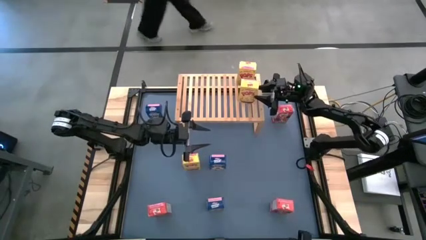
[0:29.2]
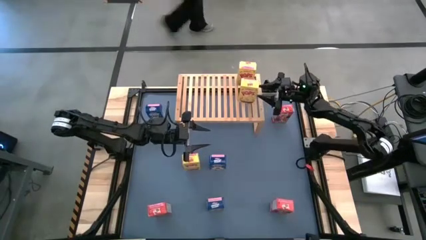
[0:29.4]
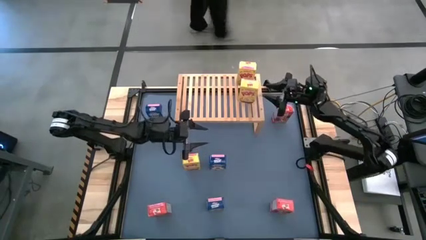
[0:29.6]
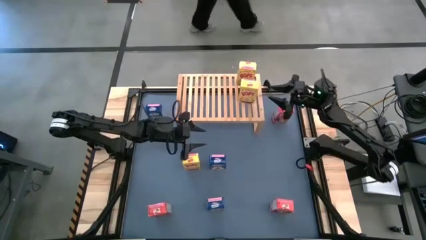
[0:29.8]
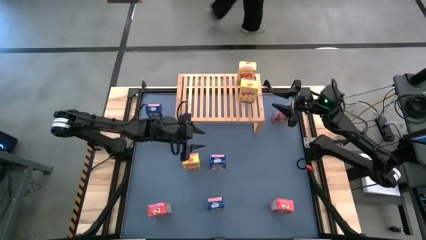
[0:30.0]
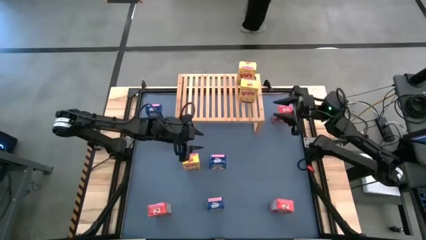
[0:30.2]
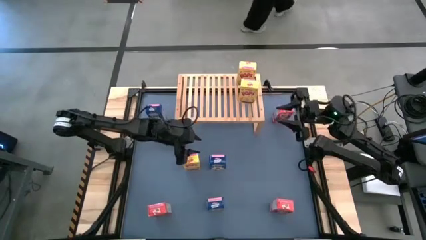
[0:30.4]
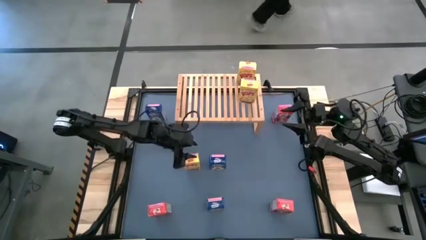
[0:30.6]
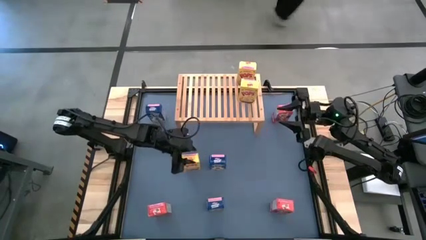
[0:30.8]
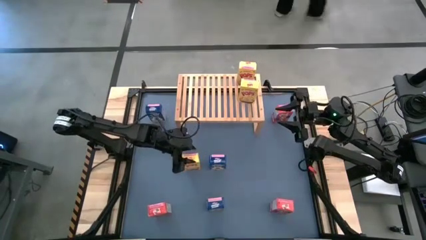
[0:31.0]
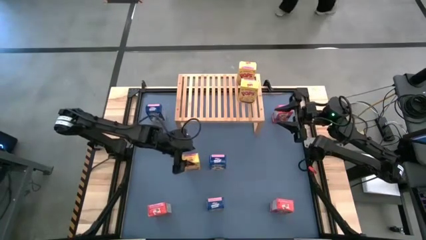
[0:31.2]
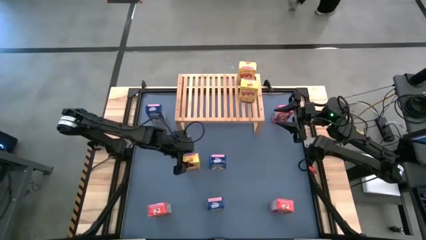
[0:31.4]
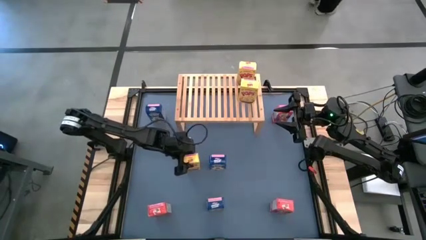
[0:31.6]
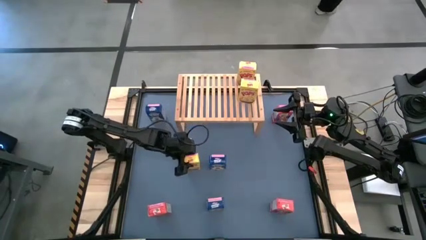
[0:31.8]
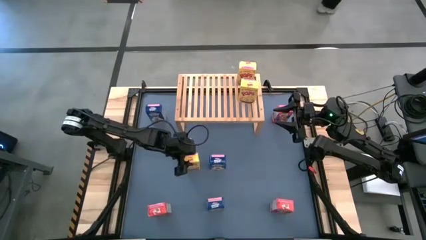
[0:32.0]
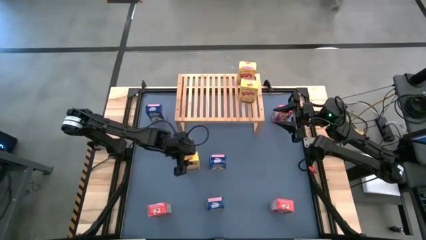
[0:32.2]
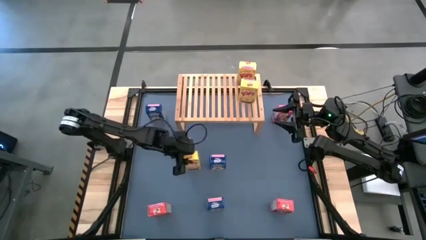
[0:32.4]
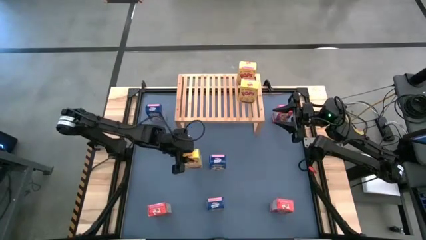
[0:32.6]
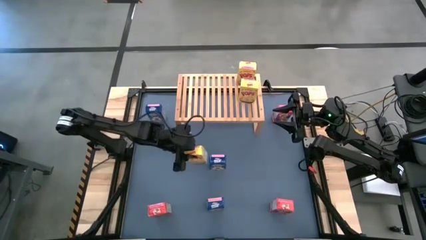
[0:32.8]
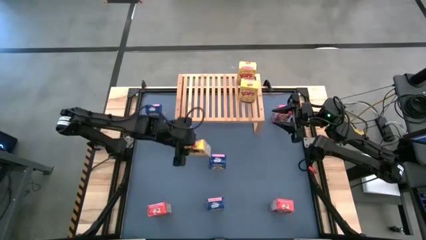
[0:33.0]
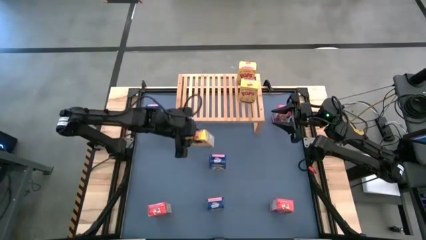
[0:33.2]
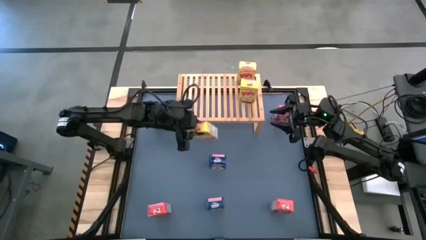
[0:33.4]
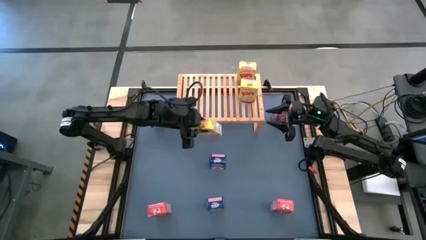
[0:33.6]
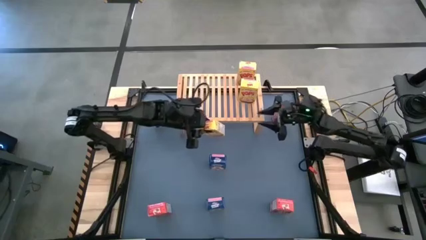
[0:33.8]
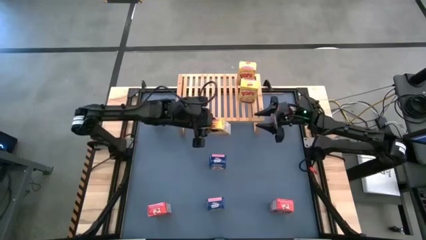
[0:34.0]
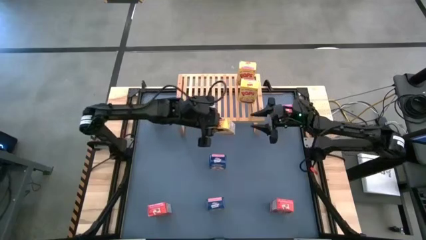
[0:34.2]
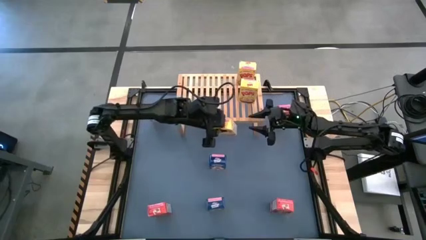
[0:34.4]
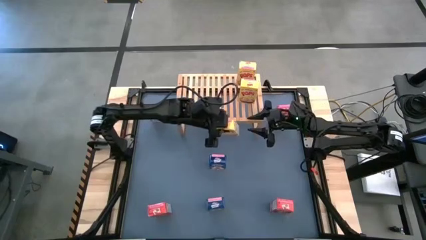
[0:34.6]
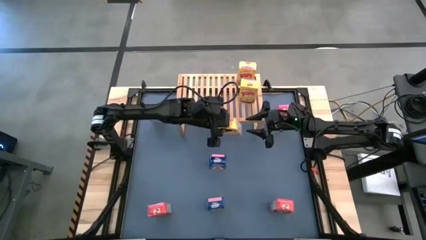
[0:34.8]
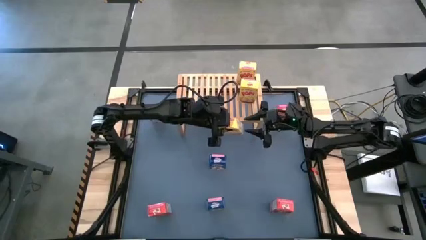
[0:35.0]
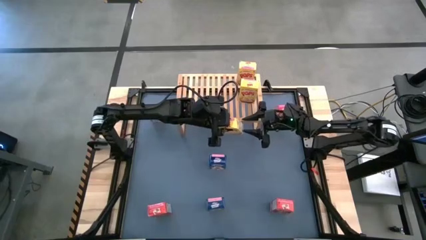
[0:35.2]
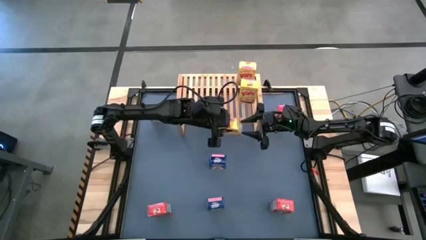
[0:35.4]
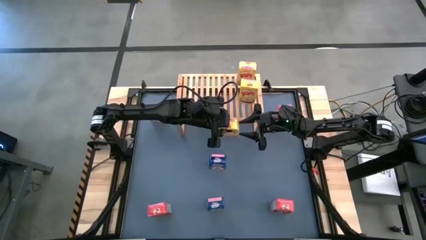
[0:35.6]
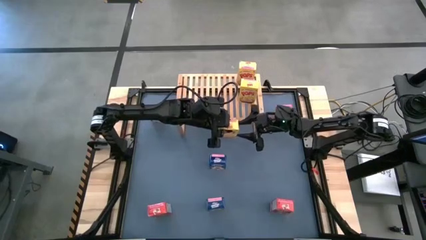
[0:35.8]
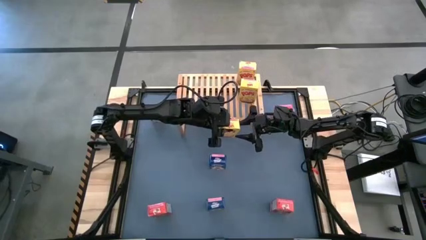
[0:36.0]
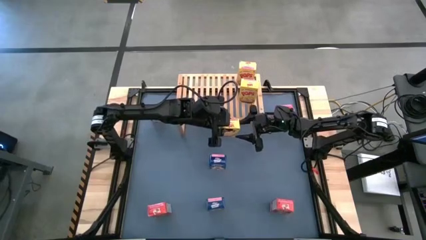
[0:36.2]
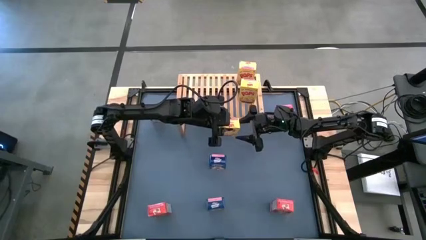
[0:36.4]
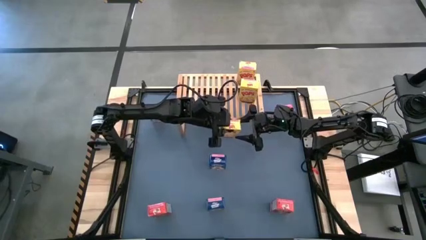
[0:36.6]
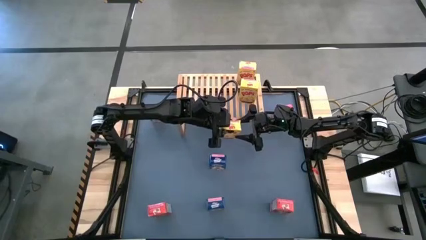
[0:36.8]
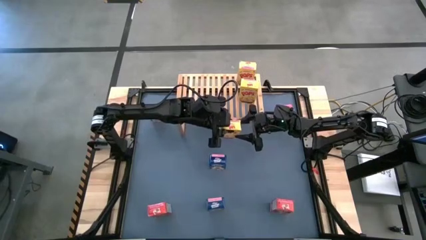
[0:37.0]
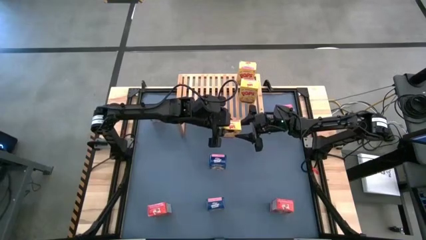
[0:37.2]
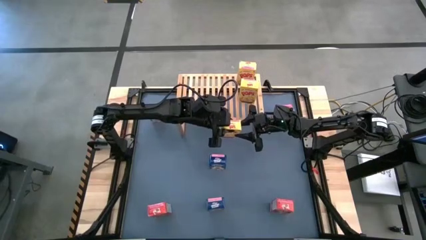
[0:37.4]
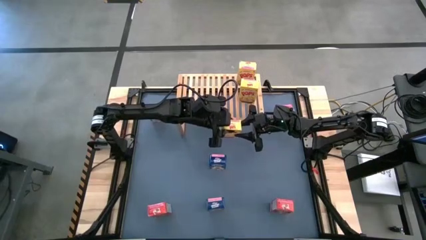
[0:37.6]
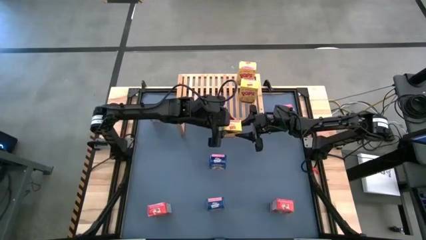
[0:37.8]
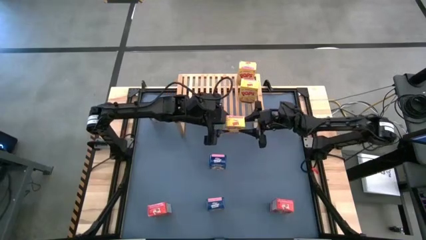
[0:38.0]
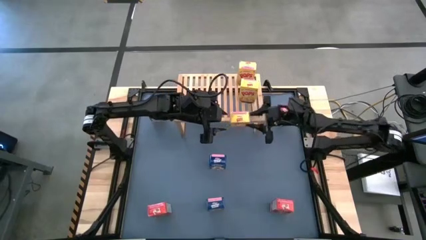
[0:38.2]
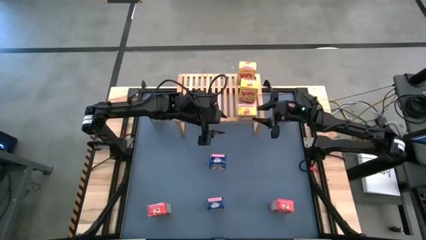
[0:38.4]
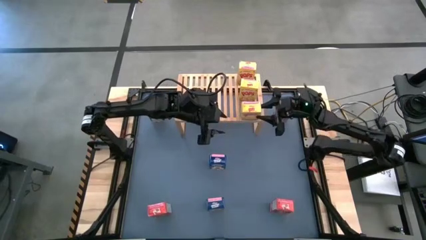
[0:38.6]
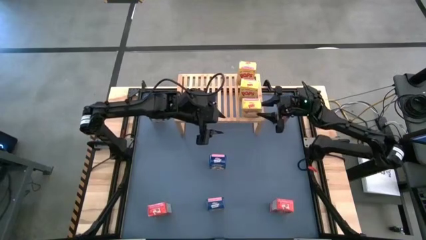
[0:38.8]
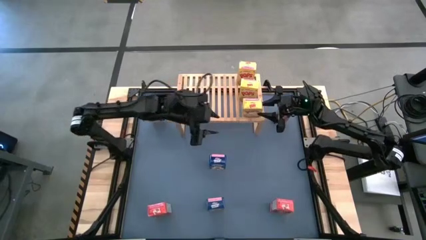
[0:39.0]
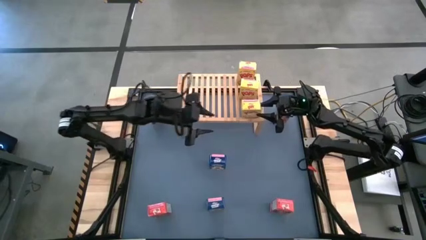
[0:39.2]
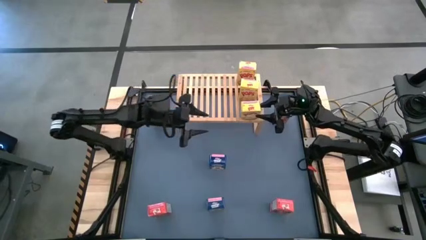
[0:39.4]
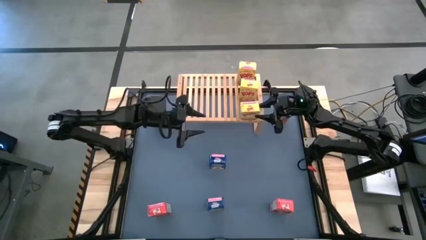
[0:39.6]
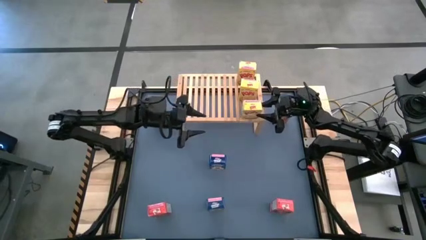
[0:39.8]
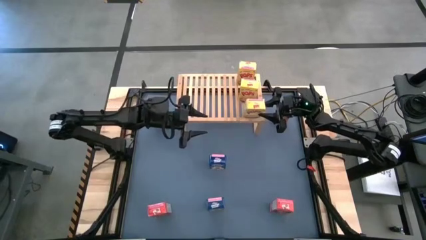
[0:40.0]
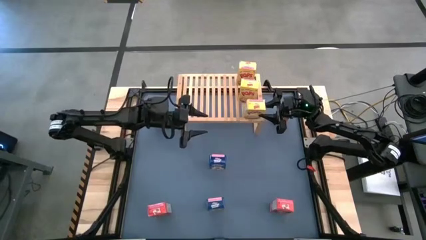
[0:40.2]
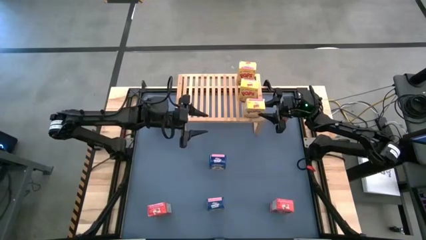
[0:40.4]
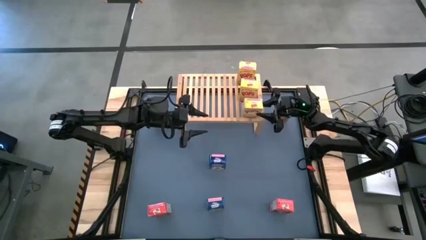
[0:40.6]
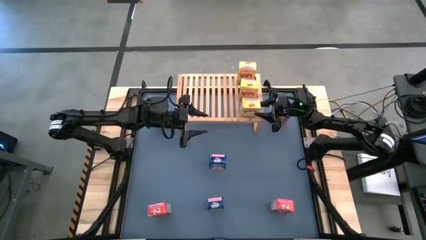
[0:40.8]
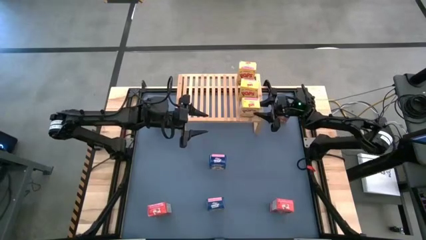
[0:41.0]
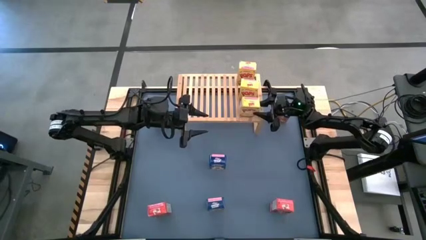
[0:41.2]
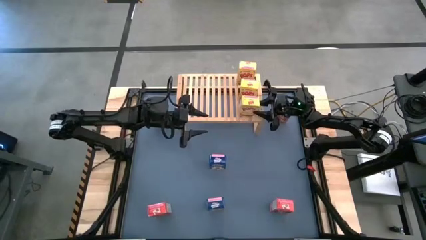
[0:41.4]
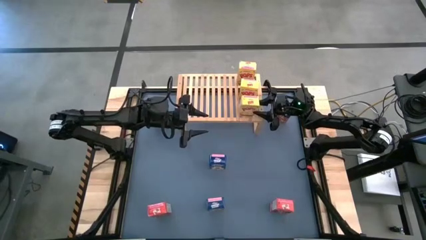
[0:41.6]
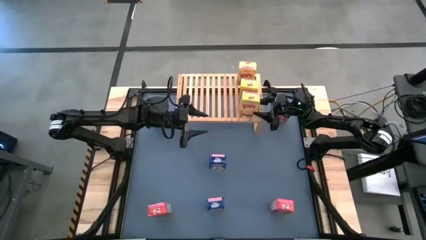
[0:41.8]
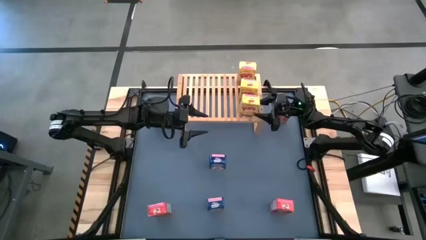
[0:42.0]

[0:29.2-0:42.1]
Task: Stack cereal on shelf
Put the yellow cereal box on the shelf aligned with the other yellow cereal boxes

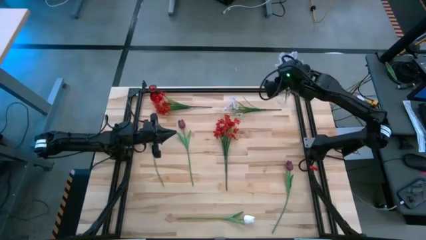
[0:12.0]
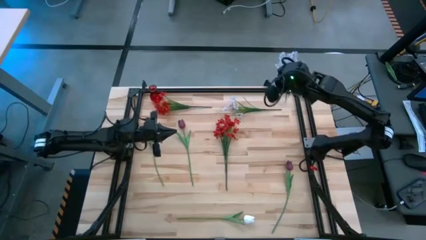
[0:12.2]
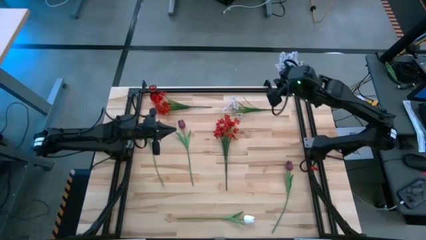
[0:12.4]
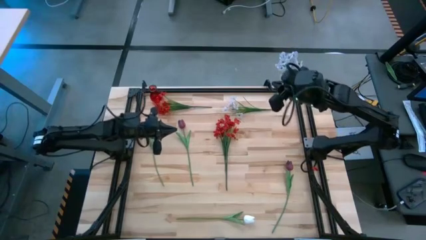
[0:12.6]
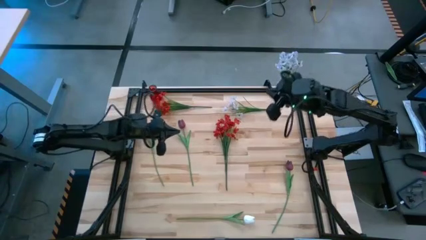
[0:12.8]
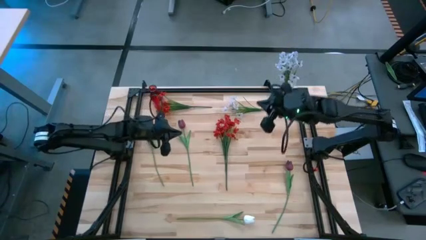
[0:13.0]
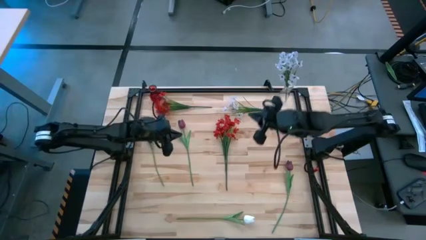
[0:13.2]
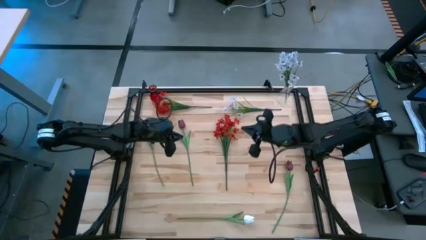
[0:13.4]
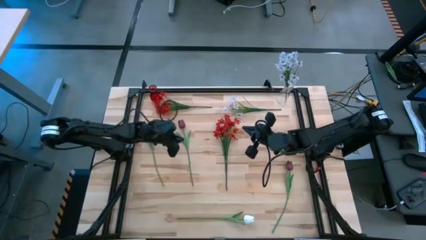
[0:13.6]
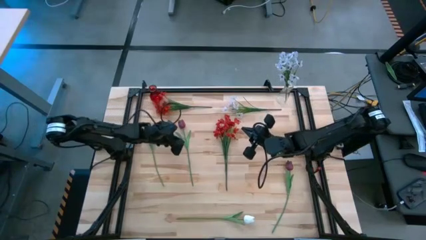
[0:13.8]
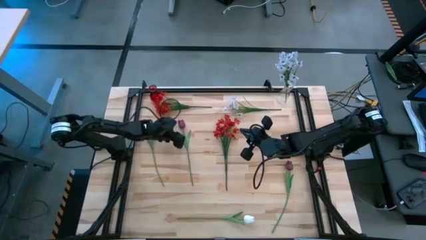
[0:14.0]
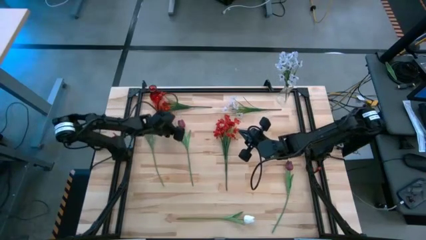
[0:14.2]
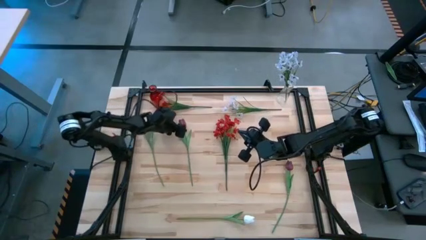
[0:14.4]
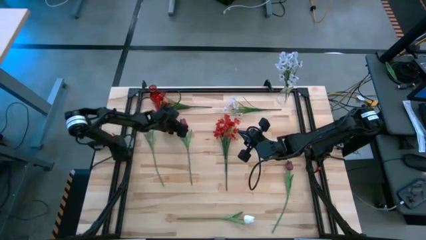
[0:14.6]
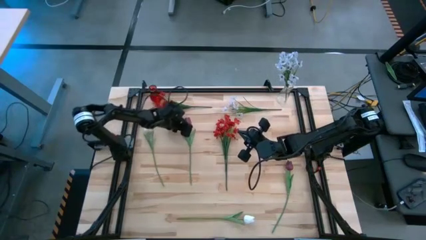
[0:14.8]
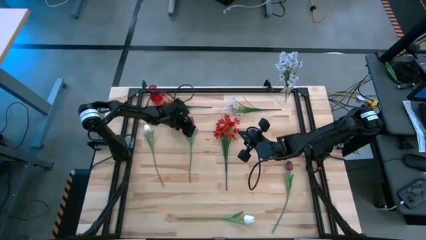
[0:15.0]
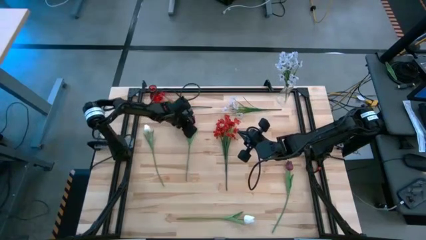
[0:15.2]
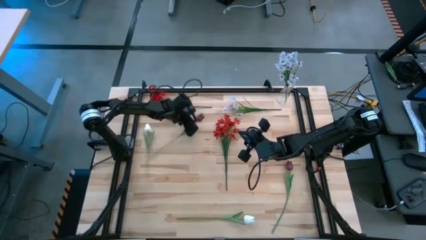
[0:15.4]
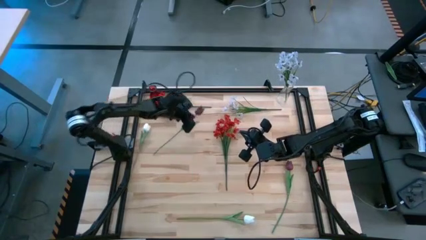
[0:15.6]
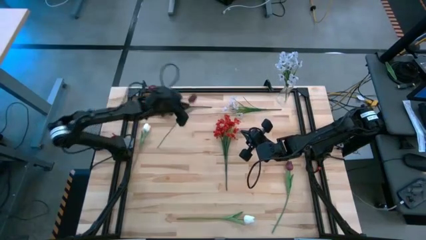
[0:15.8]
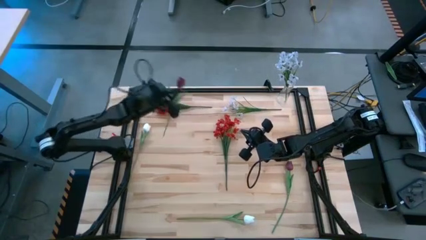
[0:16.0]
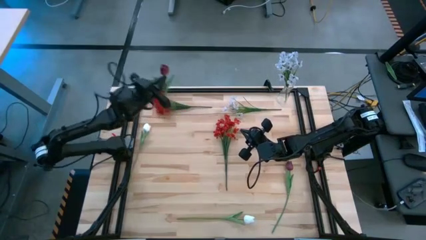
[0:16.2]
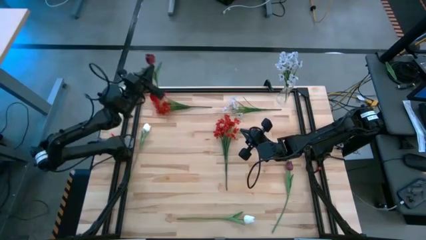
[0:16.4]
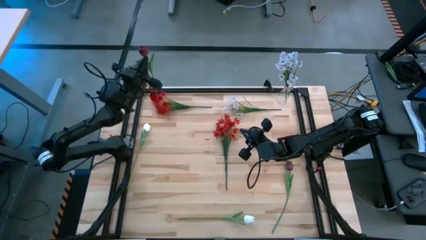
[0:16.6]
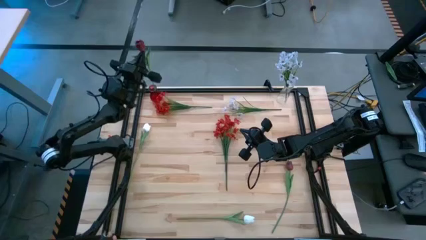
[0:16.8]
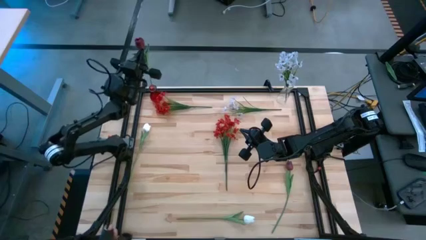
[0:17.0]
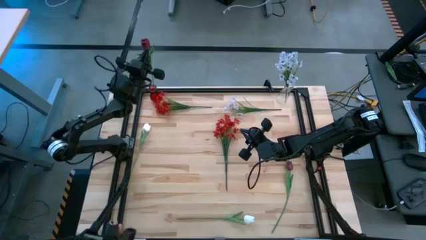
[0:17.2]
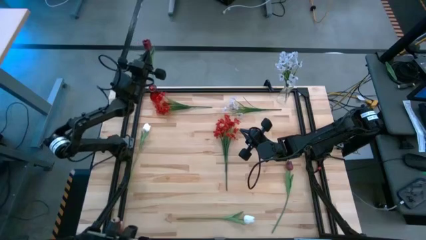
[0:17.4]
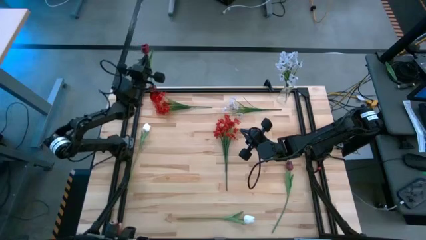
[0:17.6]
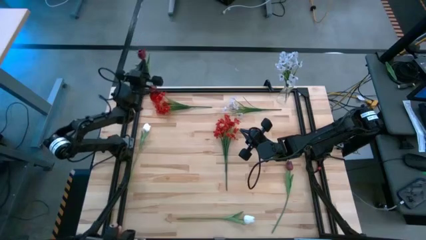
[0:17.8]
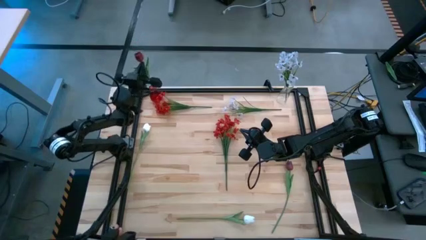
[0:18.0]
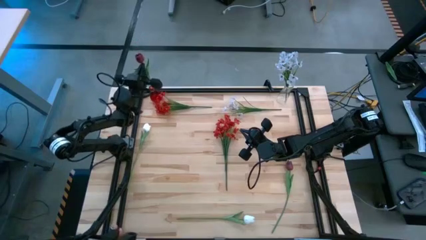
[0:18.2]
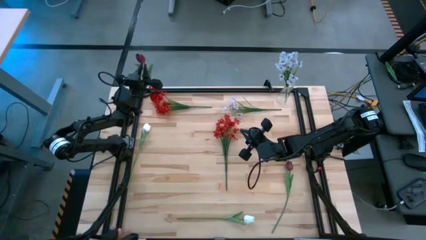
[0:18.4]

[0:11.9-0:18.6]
Task: Sort flowers into vase by color
Put the left dark red tulip into the red flower vase
